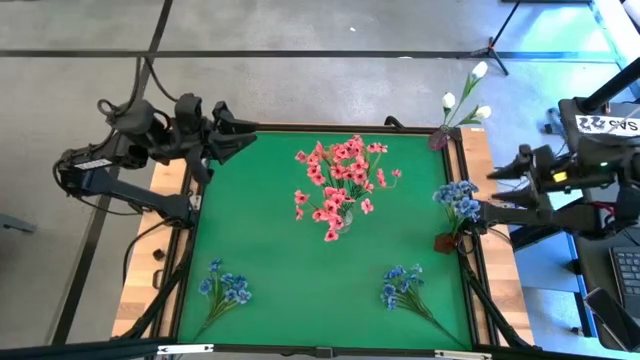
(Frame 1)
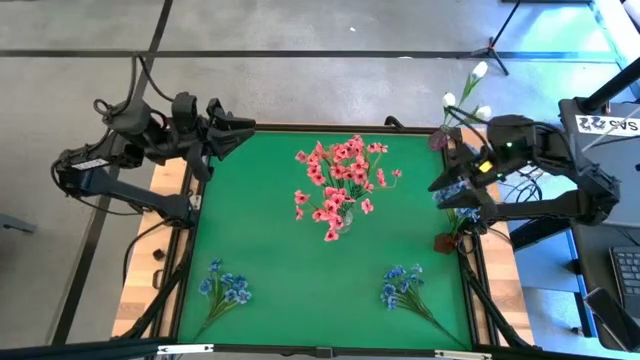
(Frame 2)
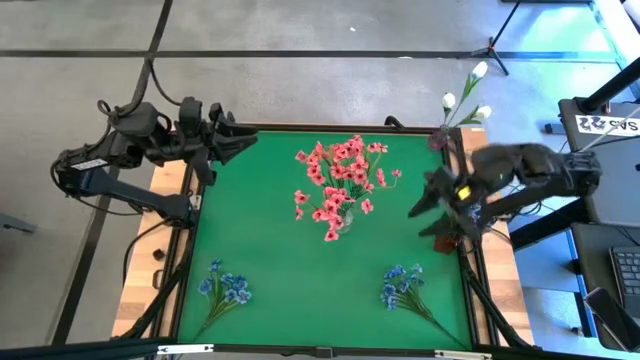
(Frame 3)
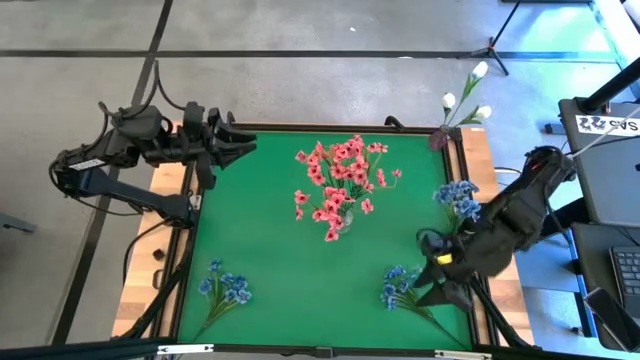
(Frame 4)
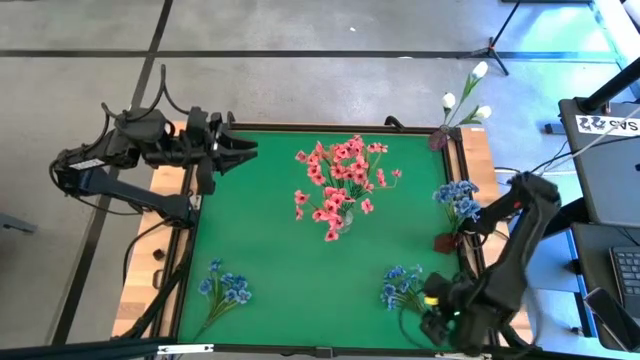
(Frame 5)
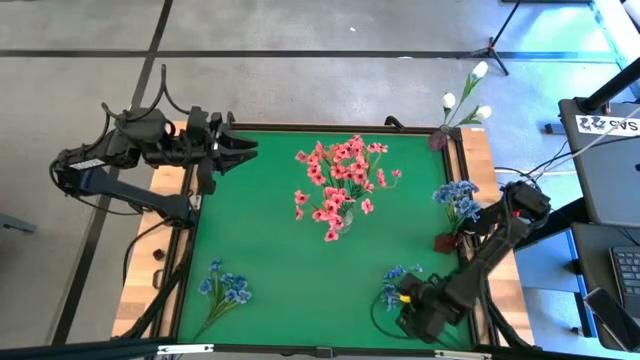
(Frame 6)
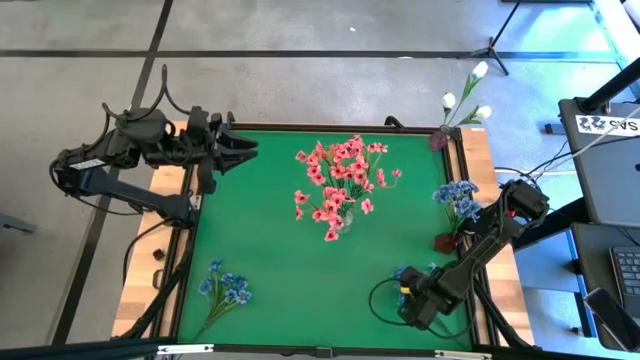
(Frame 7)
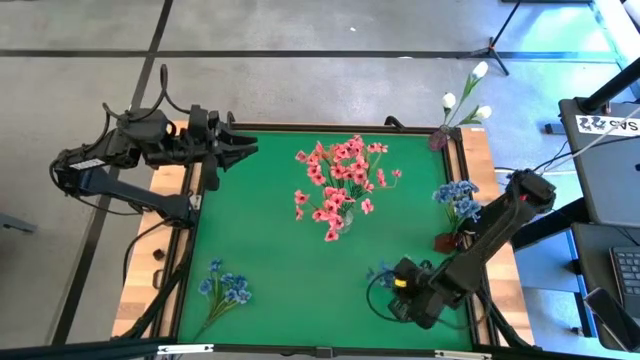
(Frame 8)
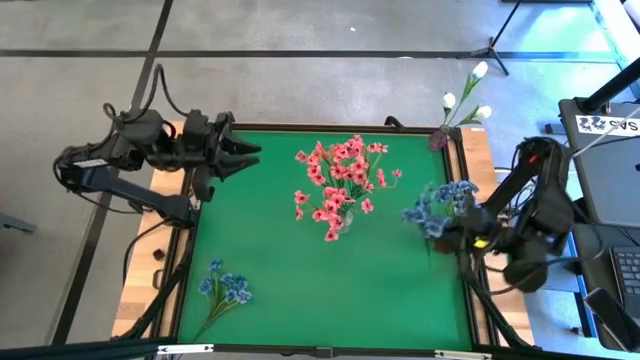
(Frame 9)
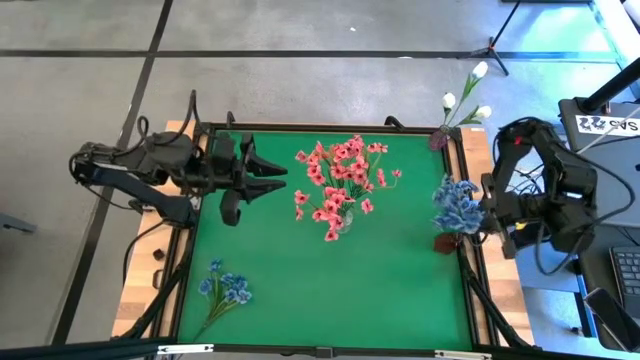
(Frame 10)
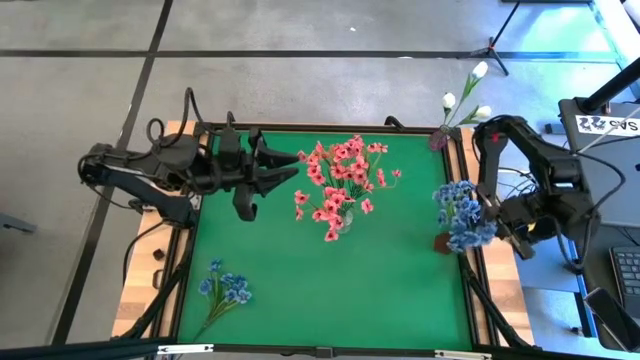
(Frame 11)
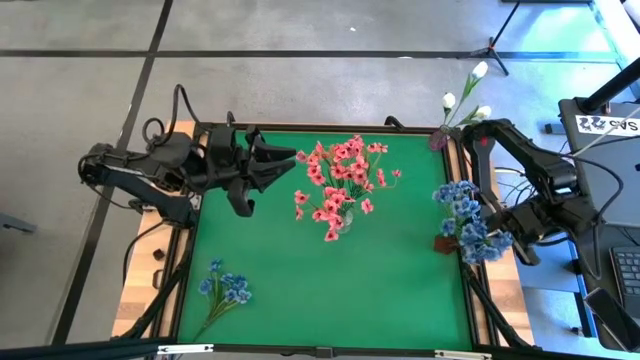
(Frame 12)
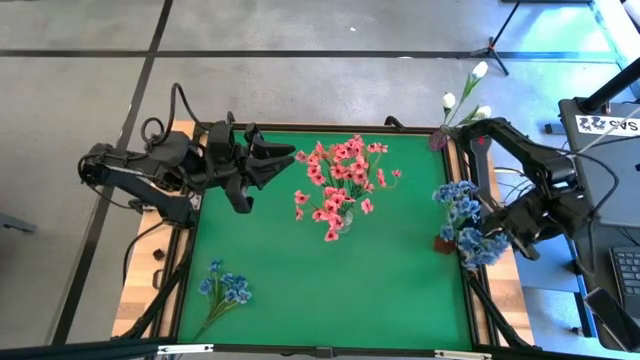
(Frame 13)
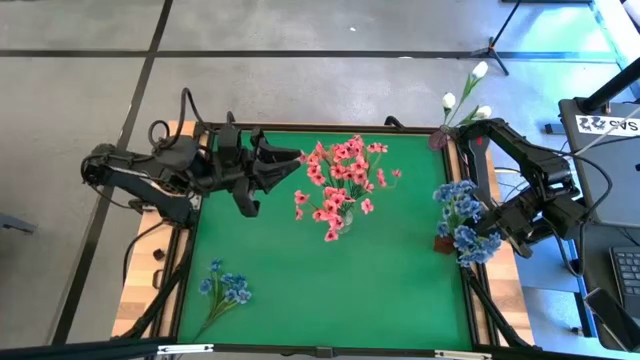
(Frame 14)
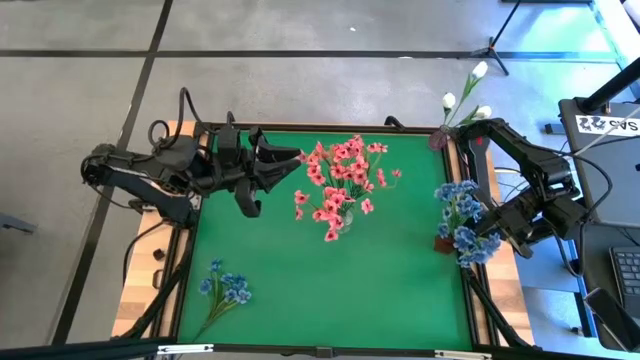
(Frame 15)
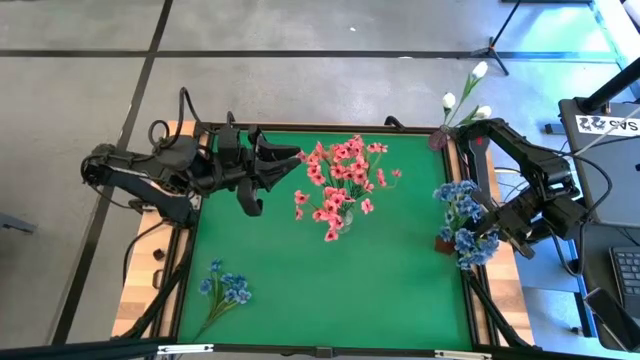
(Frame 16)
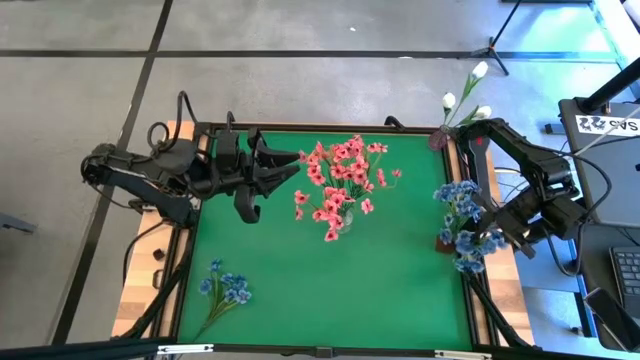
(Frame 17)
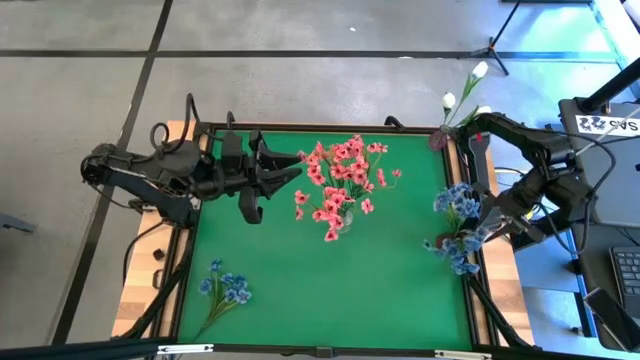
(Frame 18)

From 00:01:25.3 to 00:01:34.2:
Task: Sort flowers into vase by color
Put the right blue flowers into the red vase

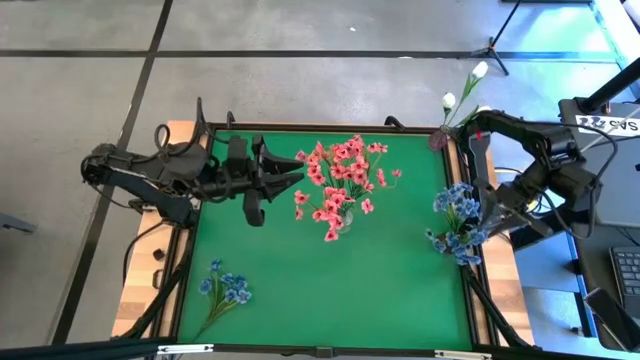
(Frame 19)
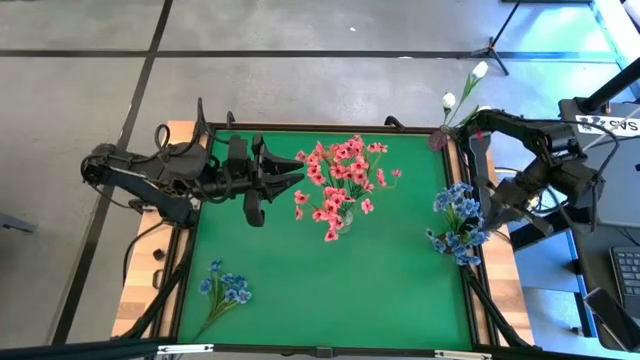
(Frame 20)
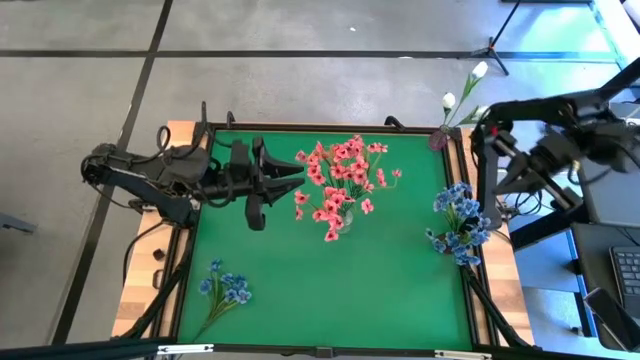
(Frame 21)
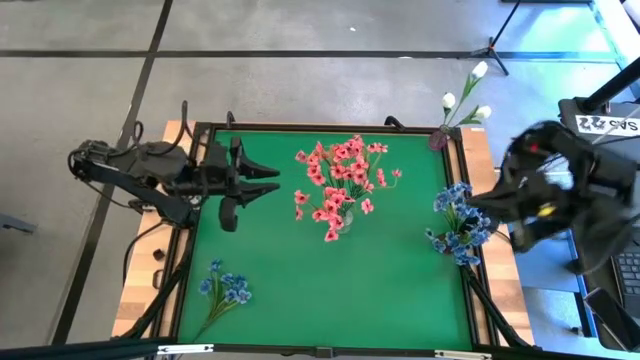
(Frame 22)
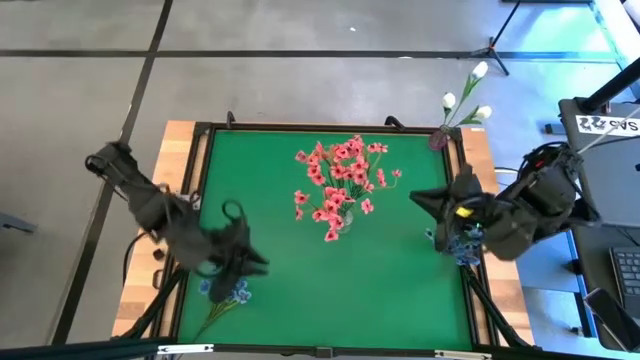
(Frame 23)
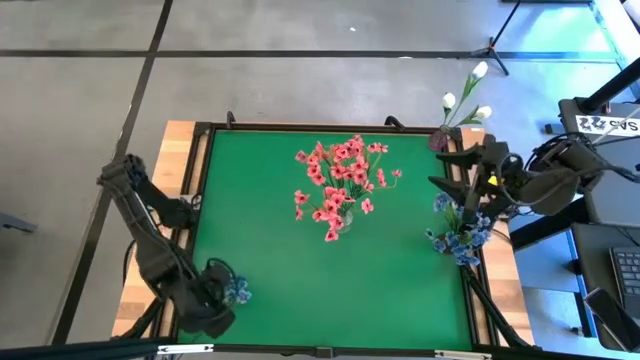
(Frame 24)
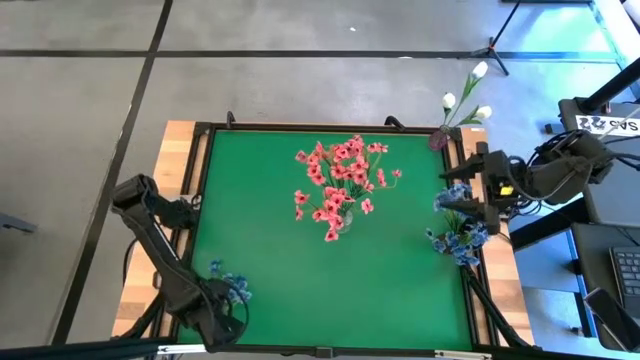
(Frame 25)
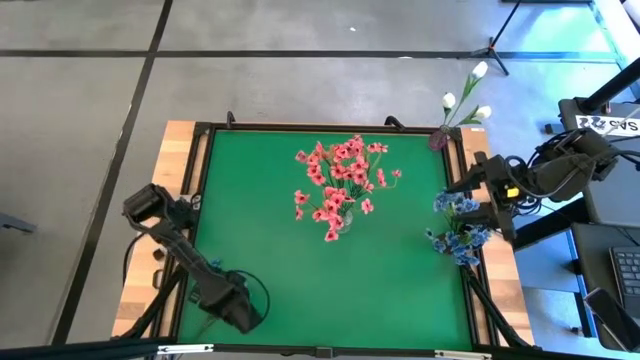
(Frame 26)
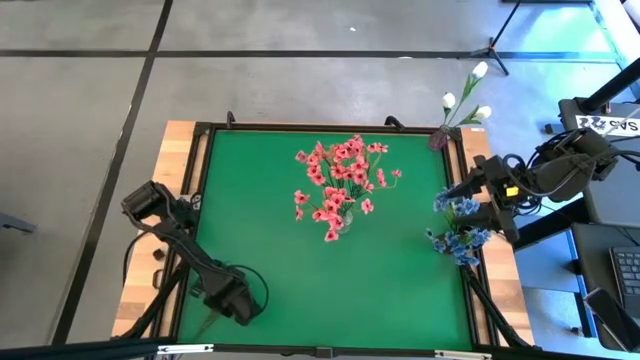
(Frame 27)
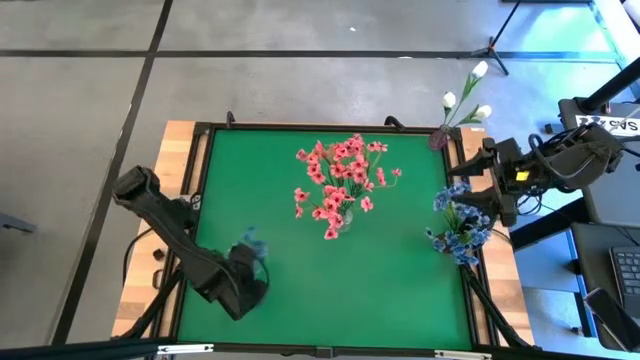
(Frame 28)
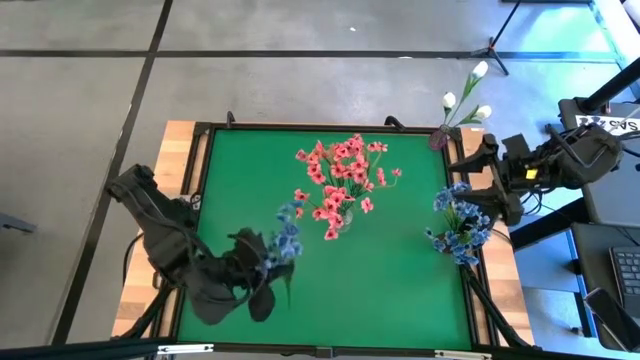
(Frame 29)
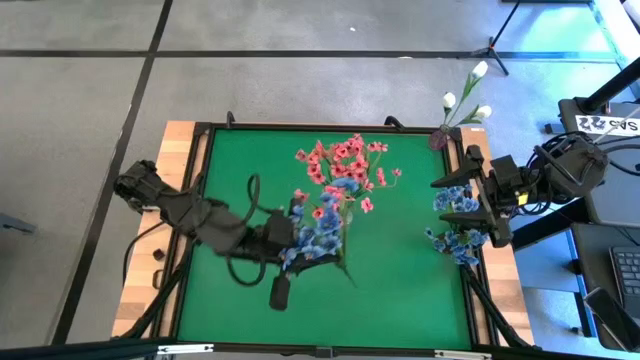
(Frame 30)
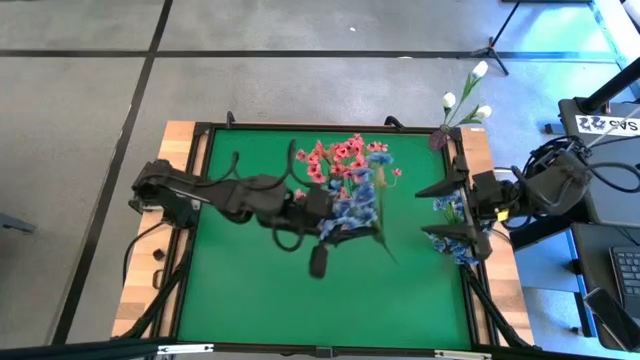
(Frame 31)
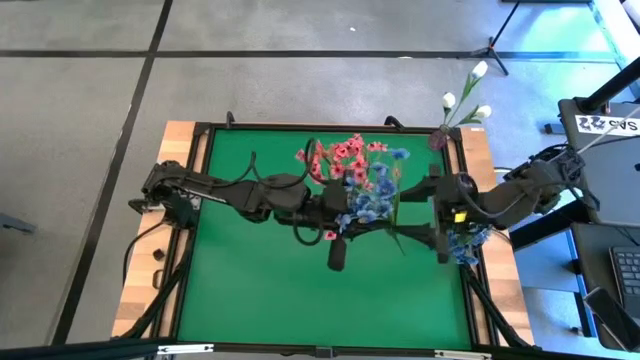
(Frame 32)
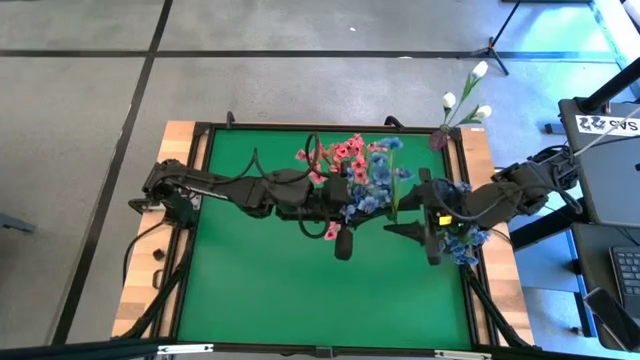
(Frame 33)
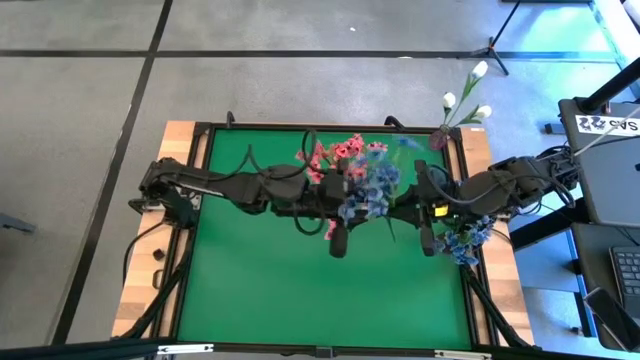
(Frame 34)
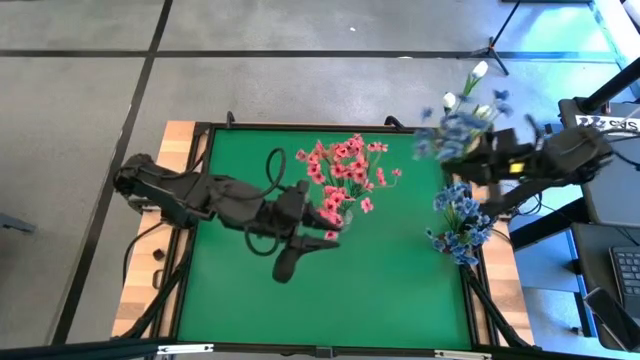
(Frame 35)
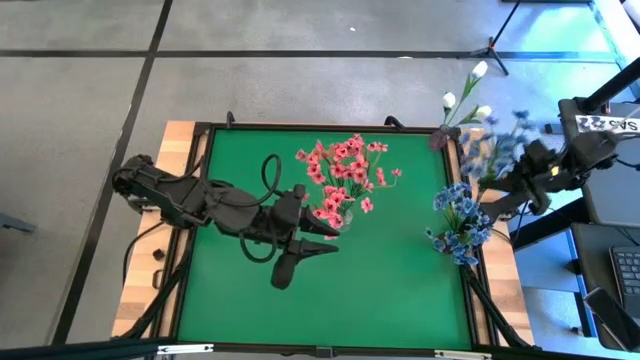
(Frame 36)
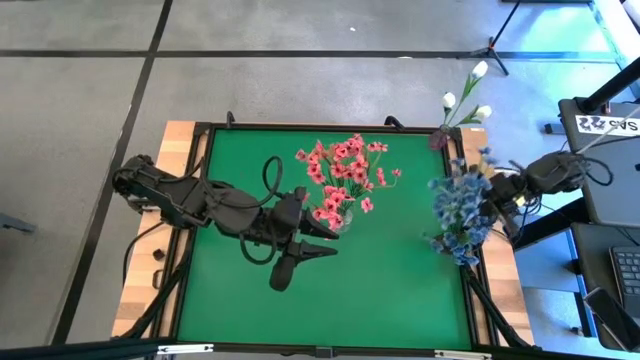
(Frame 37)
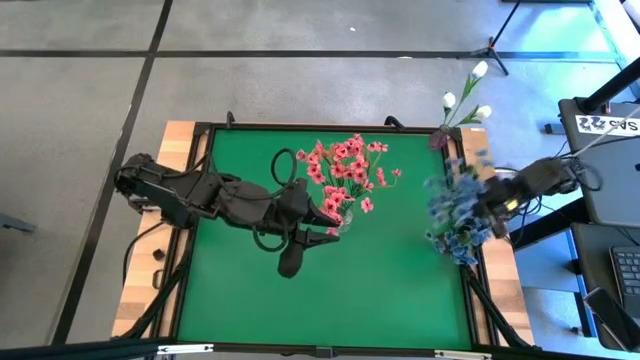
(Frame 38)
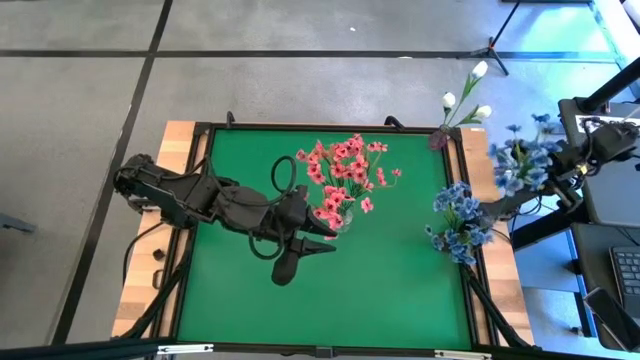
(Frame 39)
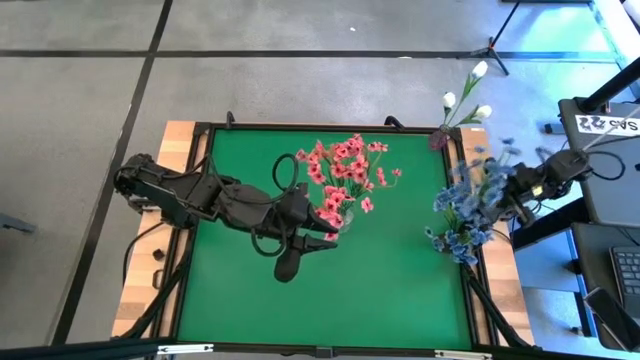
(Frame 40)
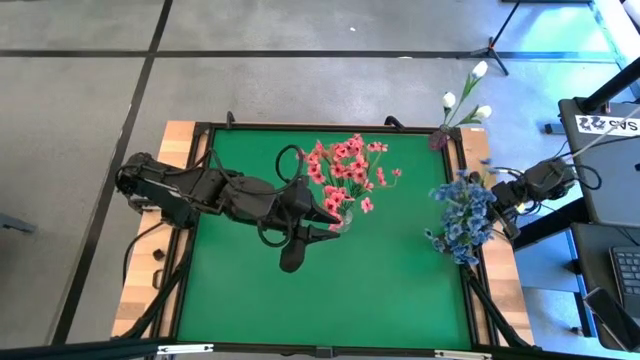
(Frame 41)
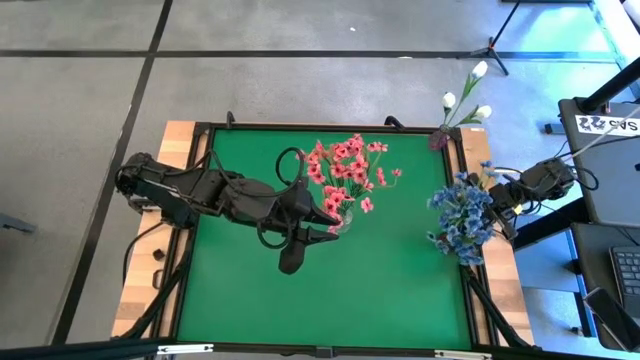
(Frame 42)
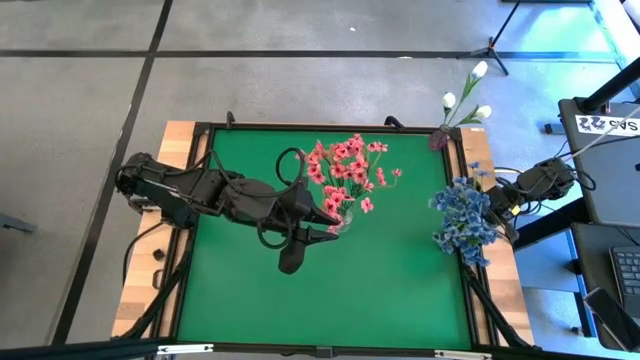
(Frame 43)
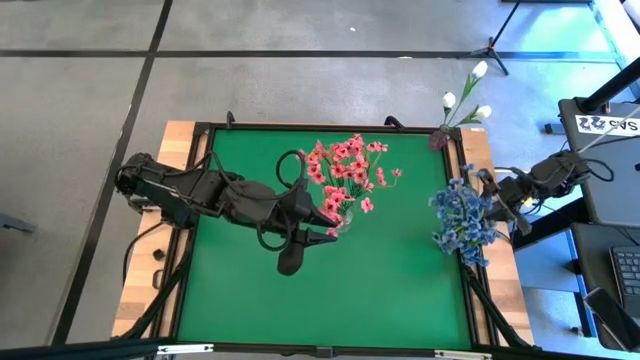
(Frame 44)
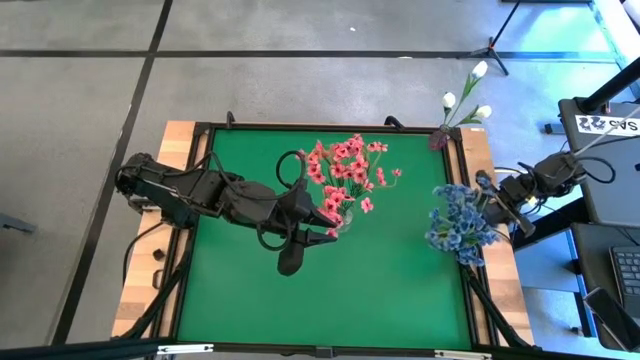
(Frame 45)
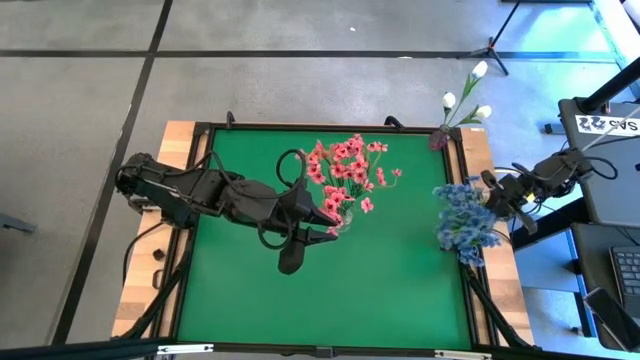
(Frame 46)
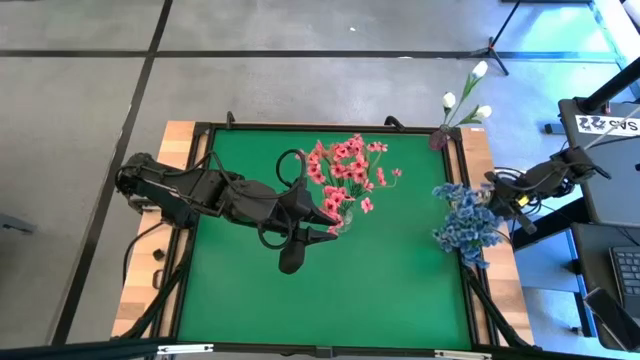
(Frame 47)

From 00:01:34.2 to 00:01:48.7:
Put the blue flowers into the red vase
